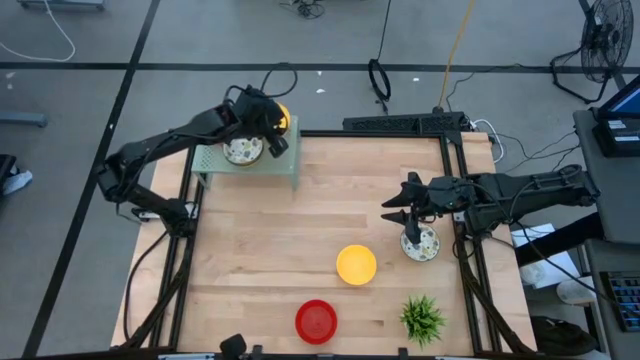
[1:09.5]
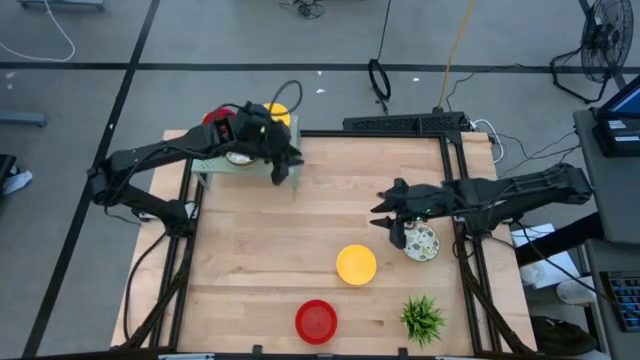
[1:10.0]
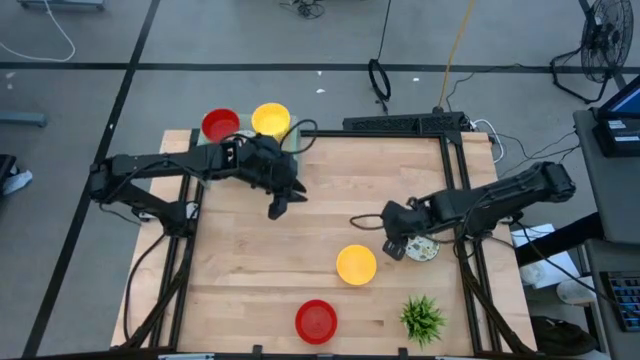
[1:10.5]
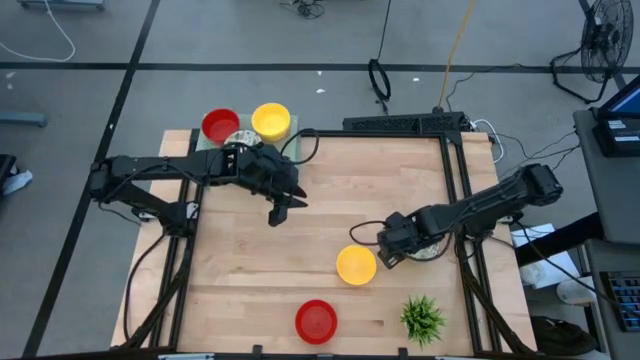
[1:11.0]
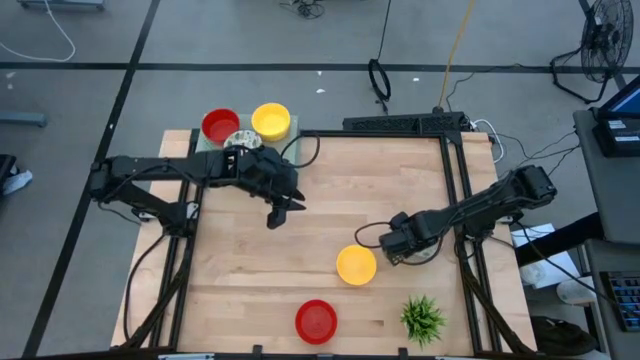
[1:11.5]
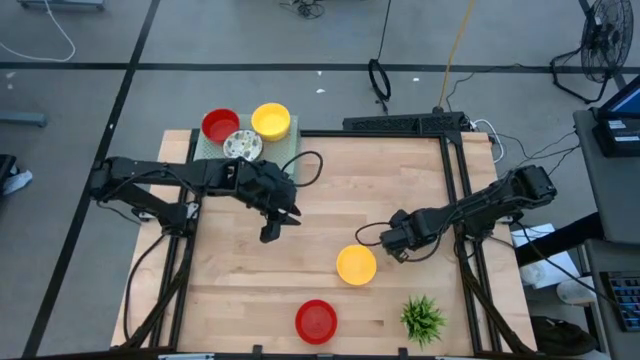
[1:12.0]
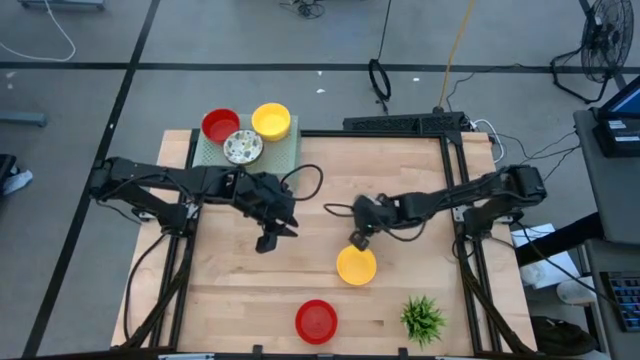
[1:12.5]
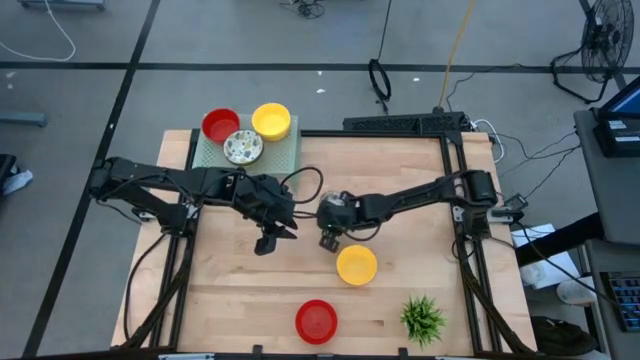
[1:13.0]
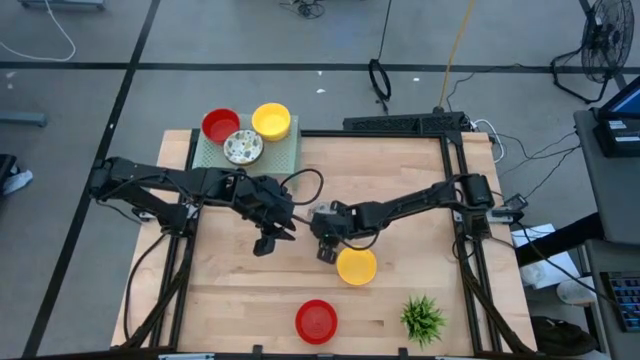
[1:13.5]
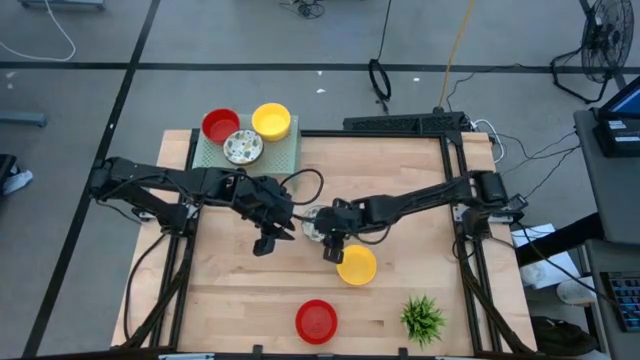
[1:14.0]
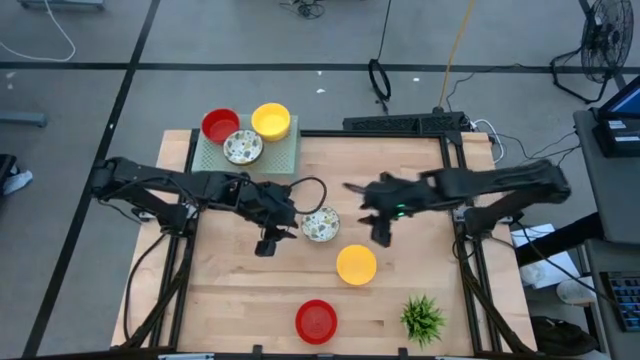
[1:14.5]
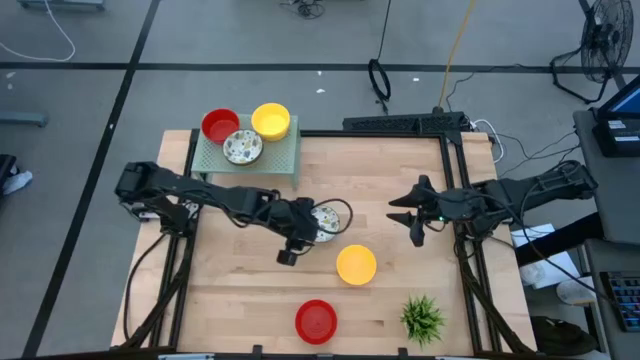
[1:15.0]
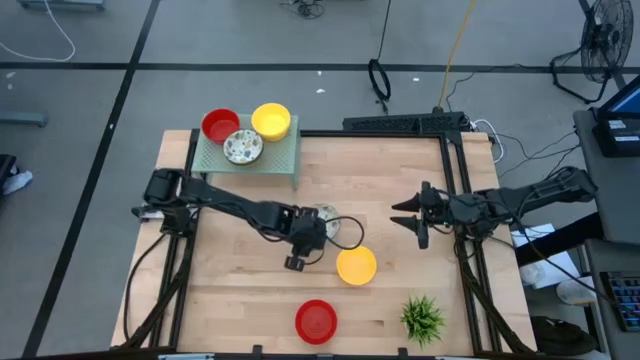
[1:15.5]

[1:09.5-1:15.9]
Task: Pick & Place Mini bowls
Stack the white patterned bowl on top of the white patterned bowls on the shelf

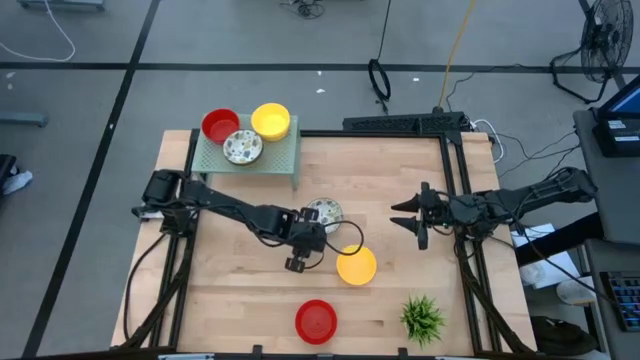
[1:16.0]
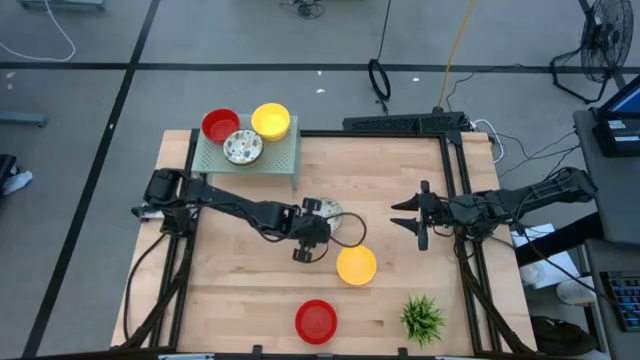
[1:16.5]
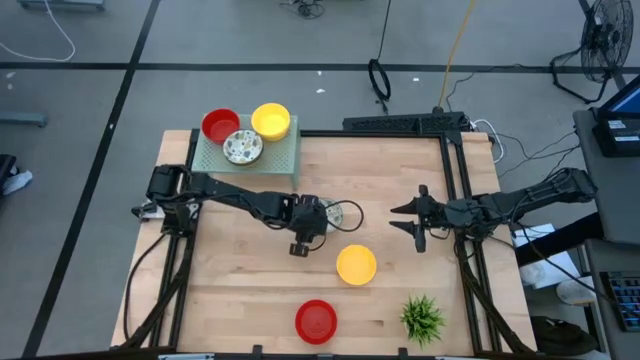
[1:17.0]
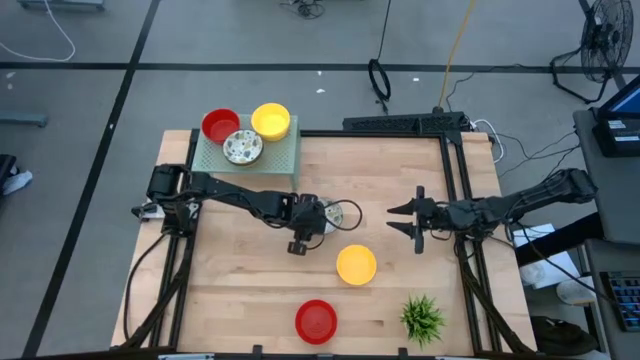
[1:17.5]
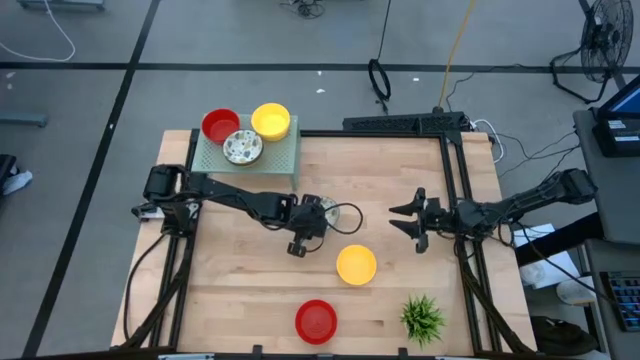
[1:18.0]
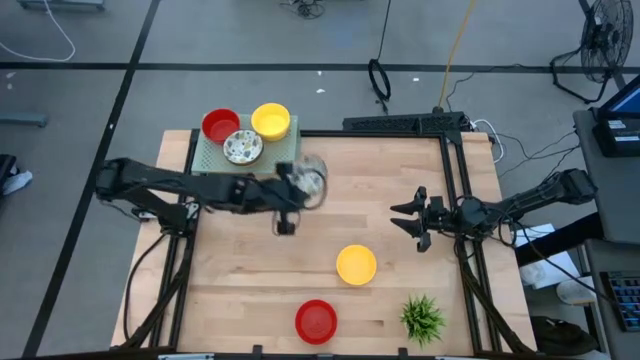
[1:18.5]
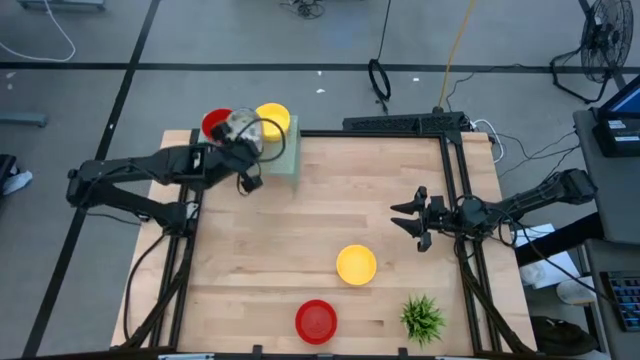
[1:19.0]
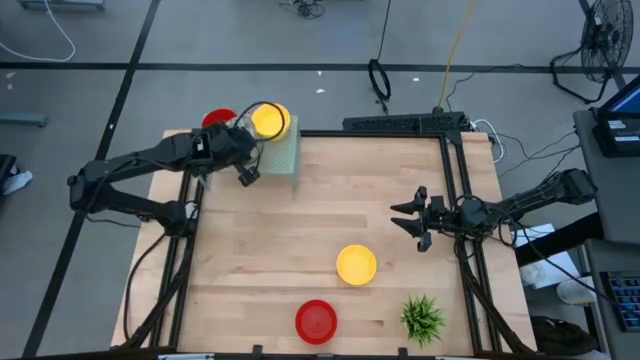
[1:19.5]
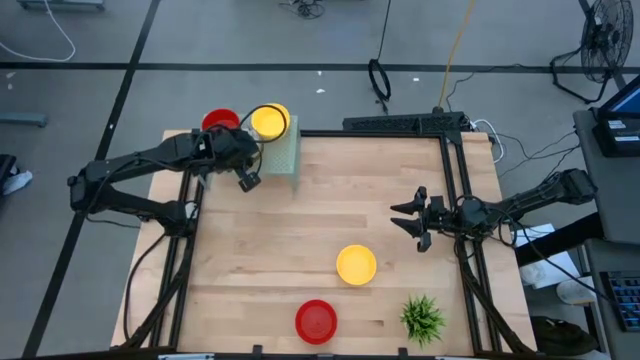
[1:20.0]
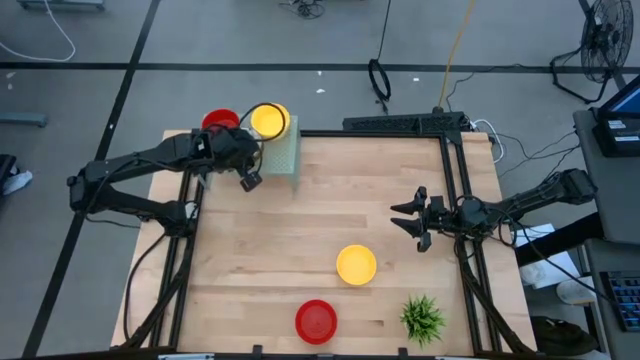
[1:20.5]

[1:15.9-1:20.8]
Stack the white patterned bowl on top of the white patterned bowls on the shelf

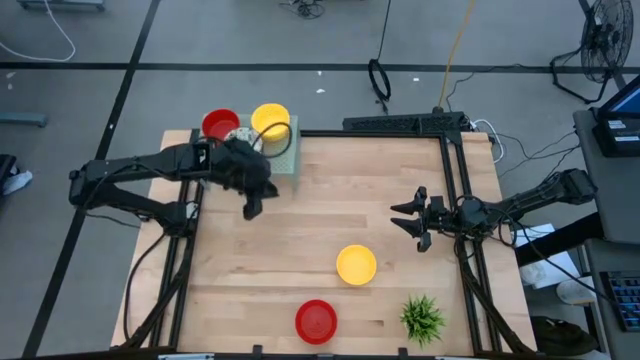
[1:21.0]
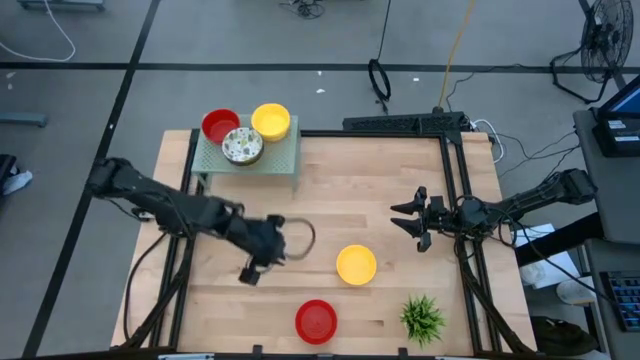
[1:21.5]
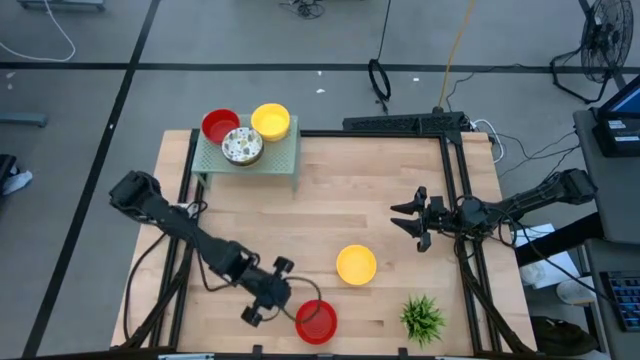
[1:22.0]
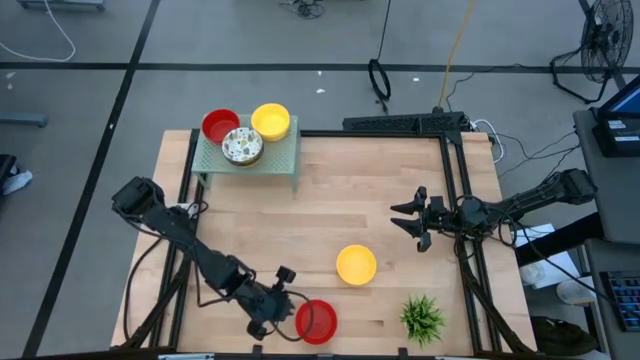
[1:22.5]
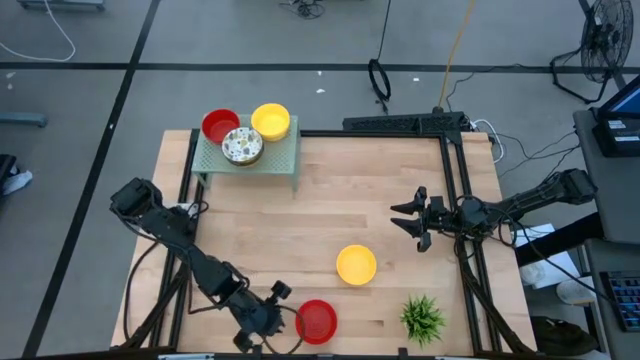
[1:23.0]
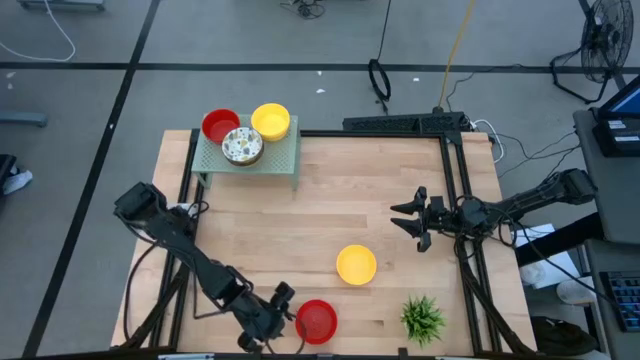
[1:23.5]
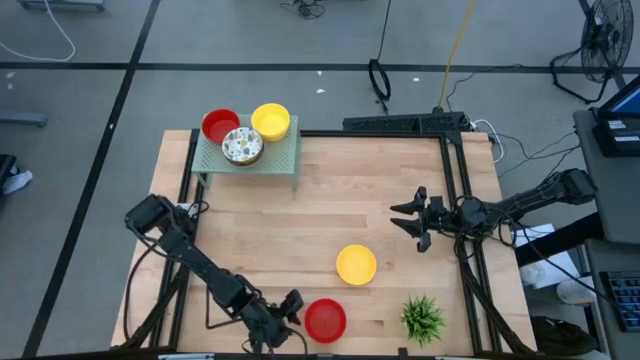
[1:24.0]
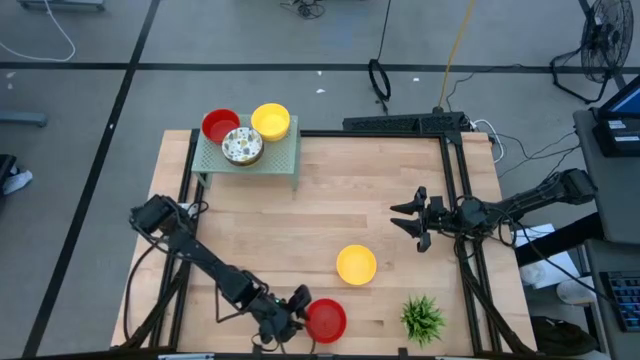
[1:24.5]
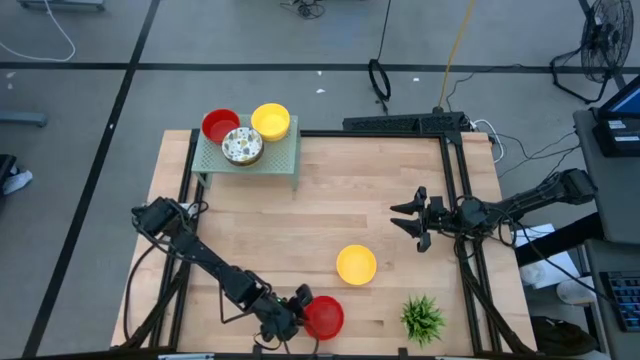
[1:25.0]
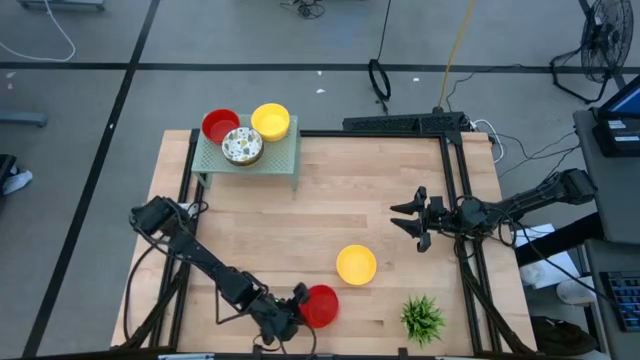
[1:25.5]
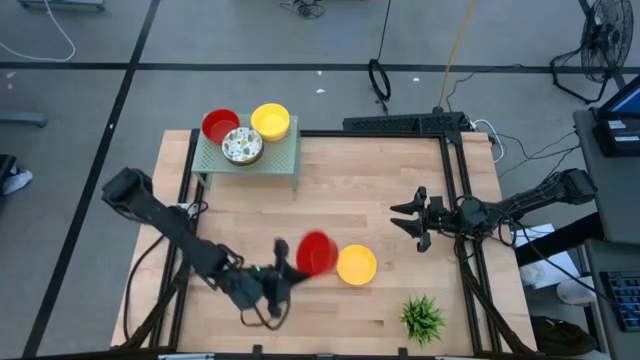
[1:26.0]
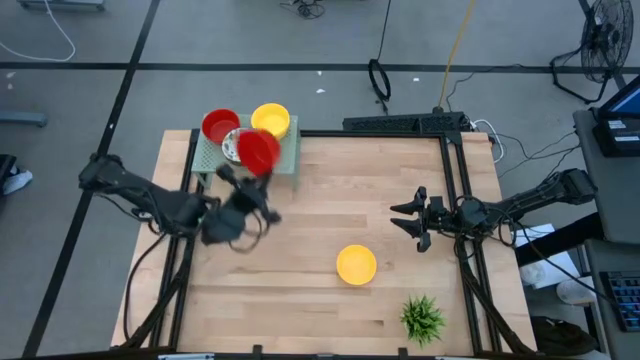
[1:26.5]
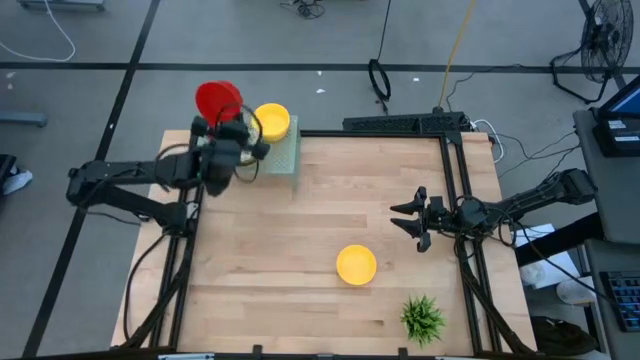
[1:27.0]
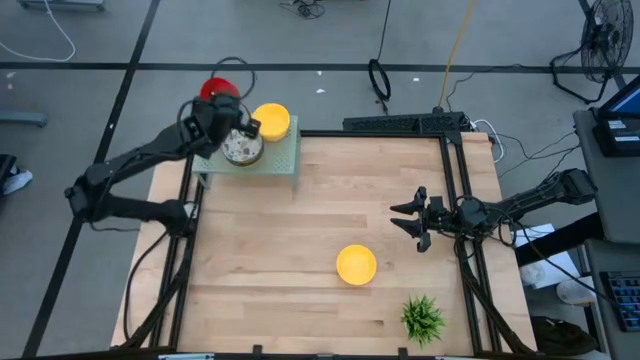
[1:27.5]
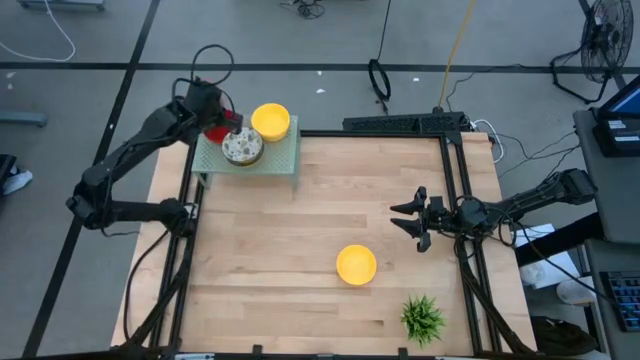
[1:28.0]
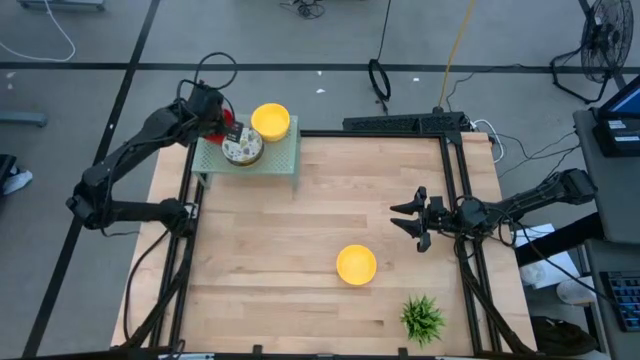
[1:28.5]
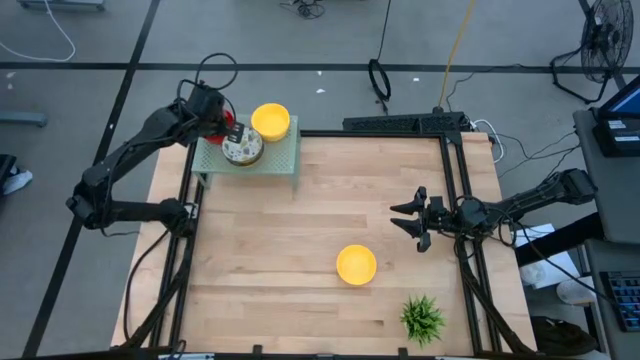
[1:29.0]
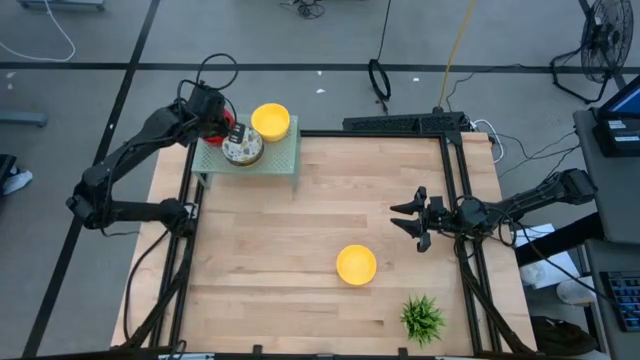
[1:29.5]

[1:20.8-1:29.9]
Stack the red bowl on top of the red bowls on the shelf

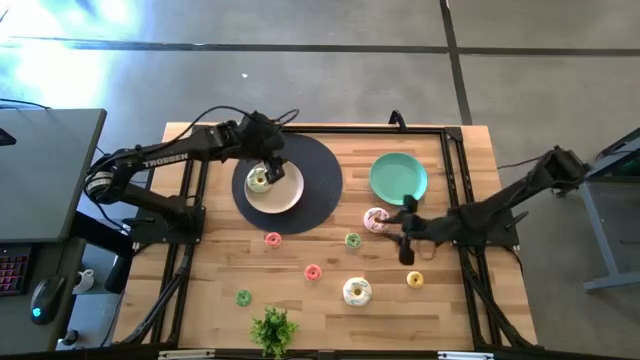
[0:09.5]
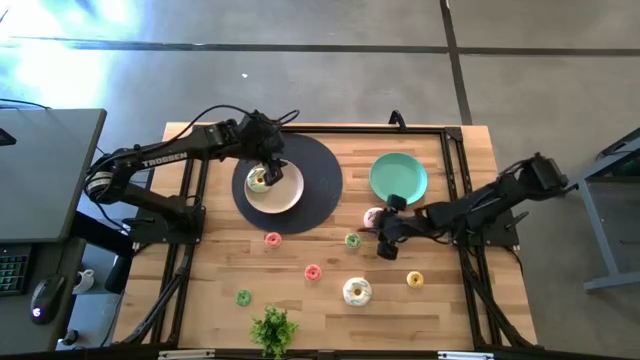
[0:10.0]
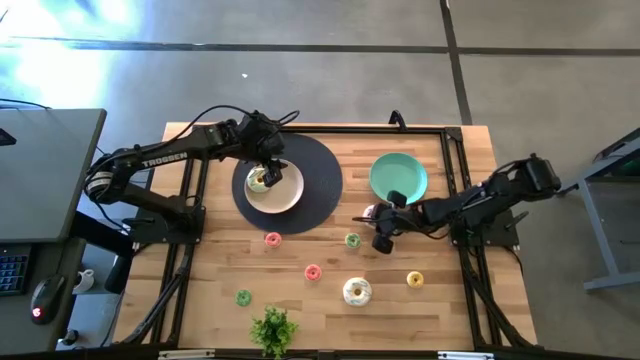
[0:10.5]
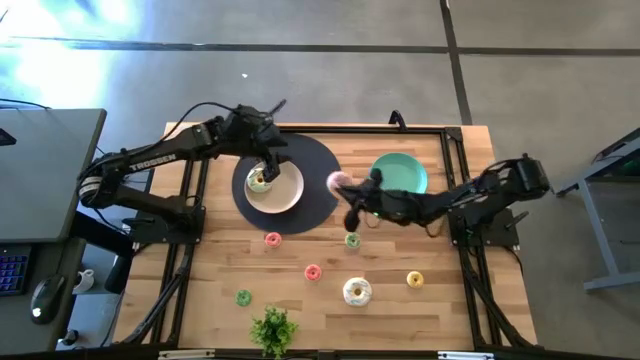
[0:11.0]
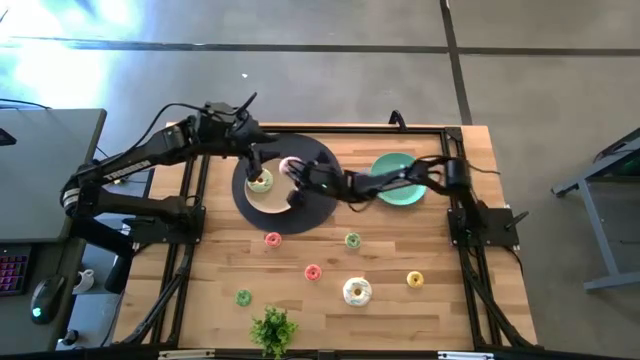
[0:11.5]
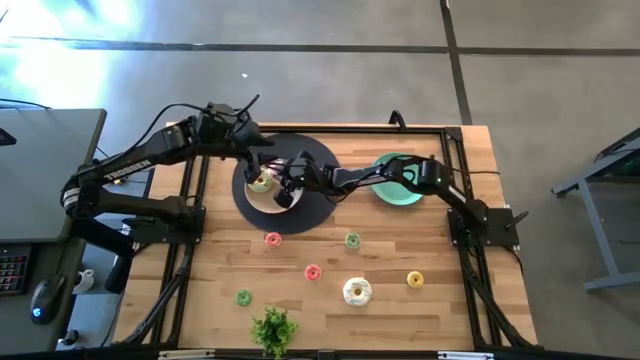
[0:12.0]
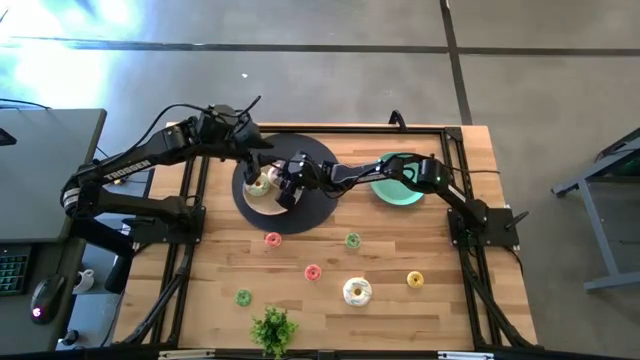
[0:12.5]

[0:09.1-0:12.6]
Task: Pick & Place donuts
Put the big pink donut on the white plate
